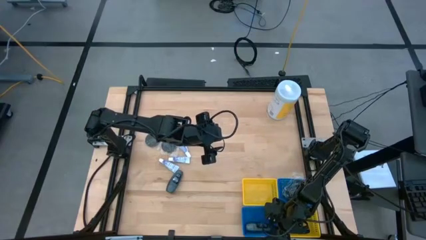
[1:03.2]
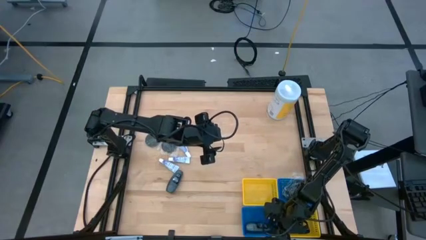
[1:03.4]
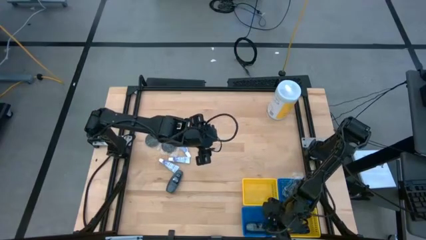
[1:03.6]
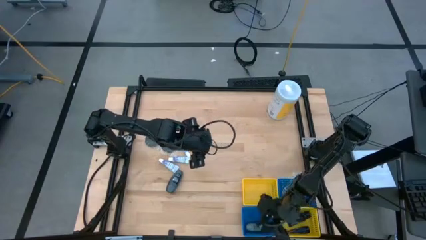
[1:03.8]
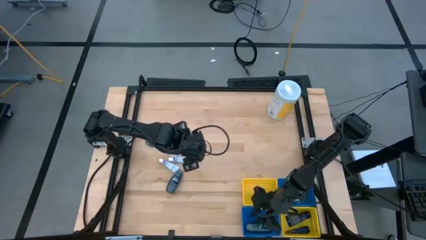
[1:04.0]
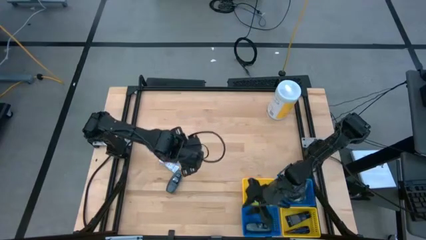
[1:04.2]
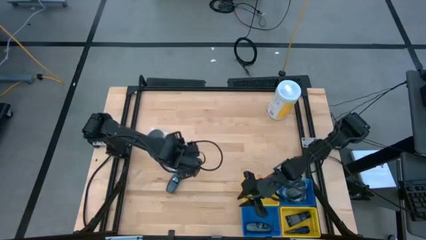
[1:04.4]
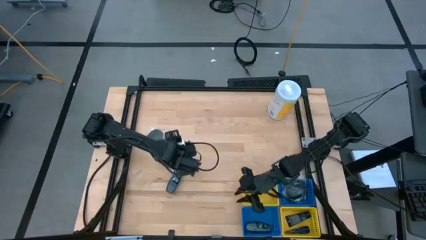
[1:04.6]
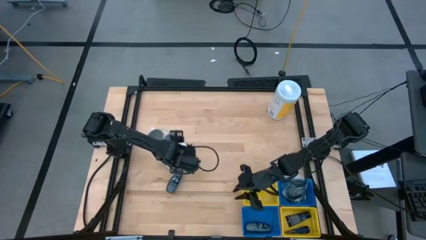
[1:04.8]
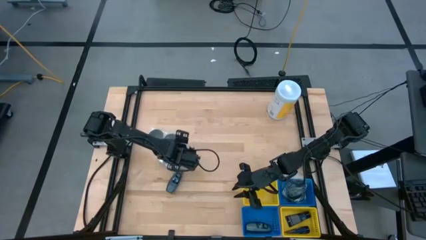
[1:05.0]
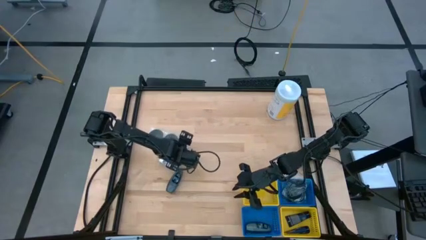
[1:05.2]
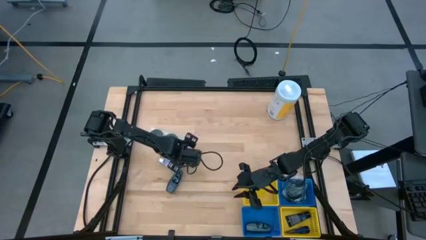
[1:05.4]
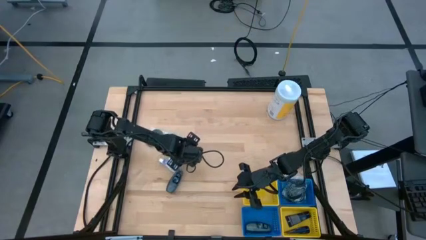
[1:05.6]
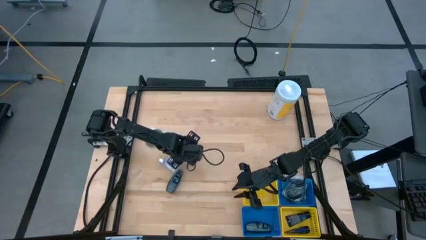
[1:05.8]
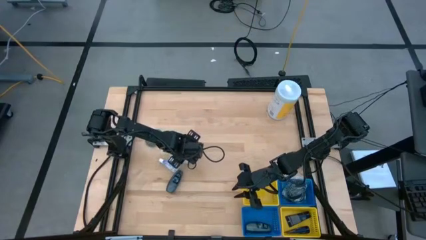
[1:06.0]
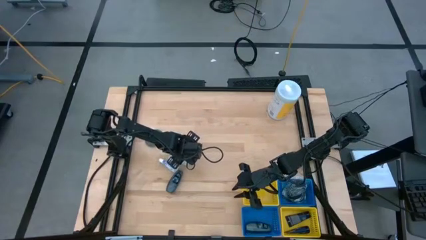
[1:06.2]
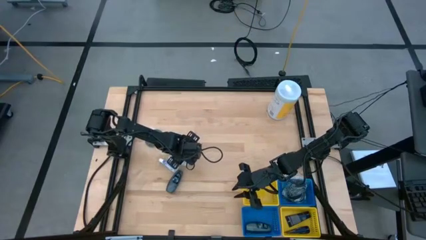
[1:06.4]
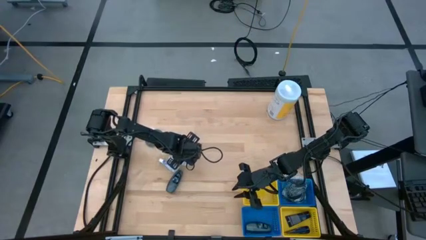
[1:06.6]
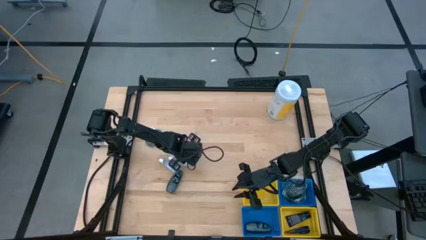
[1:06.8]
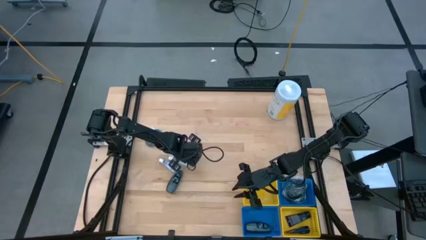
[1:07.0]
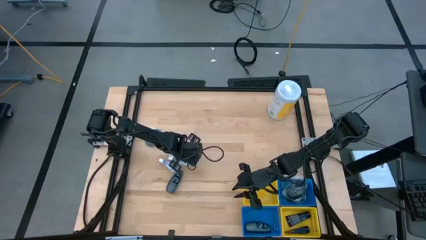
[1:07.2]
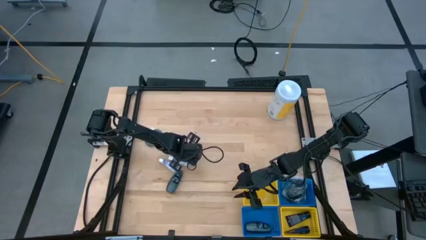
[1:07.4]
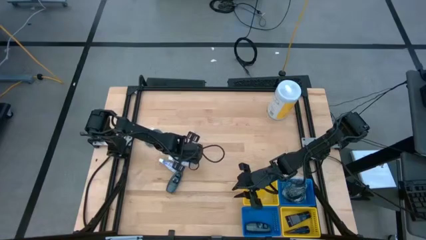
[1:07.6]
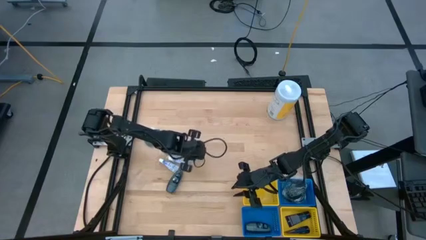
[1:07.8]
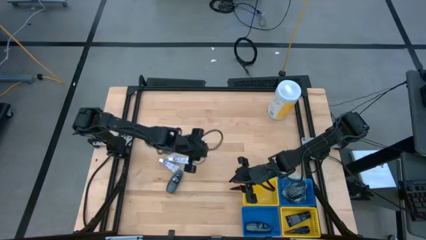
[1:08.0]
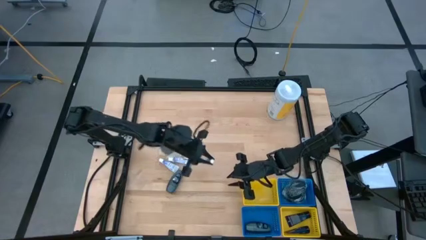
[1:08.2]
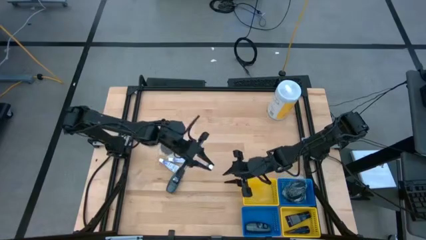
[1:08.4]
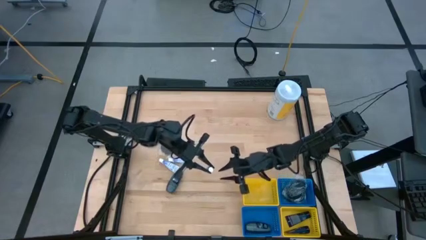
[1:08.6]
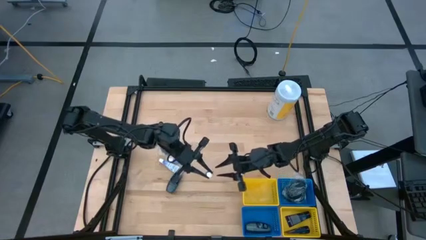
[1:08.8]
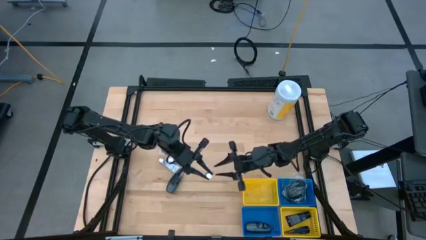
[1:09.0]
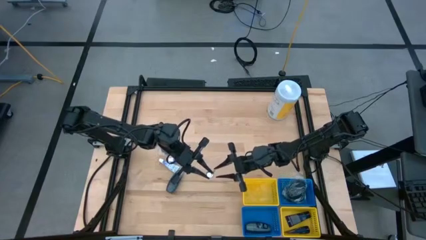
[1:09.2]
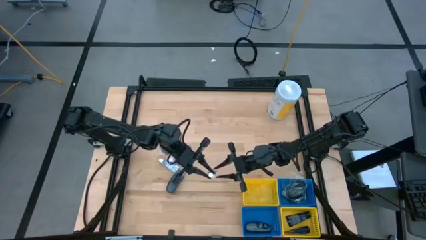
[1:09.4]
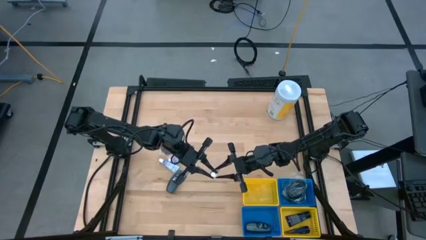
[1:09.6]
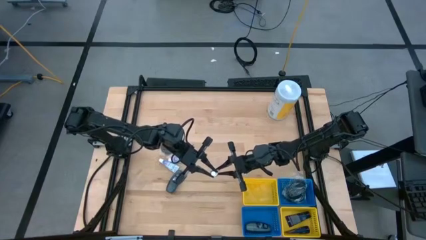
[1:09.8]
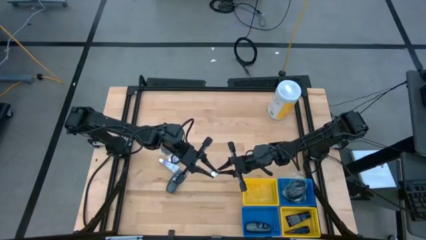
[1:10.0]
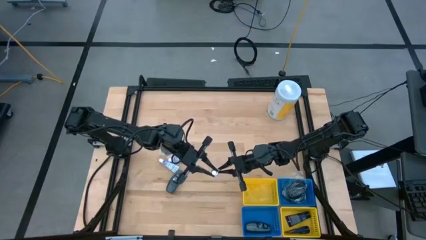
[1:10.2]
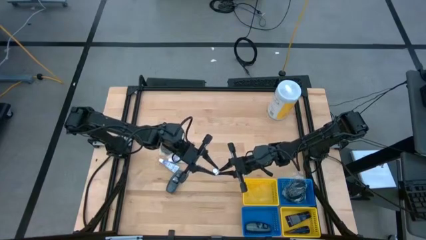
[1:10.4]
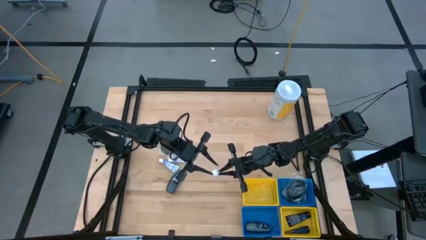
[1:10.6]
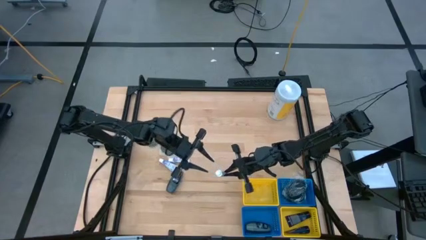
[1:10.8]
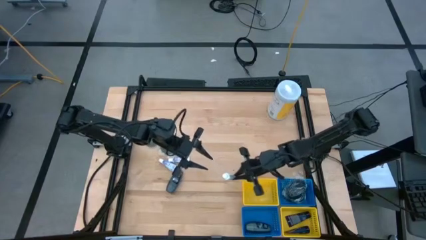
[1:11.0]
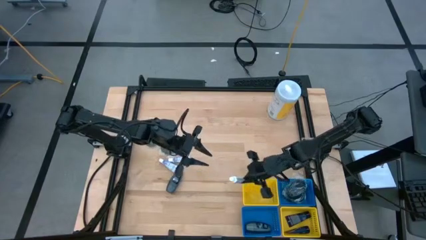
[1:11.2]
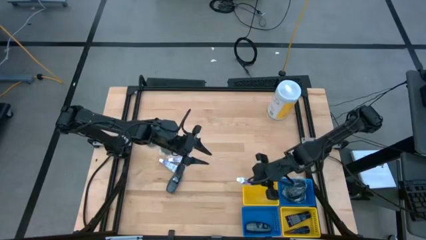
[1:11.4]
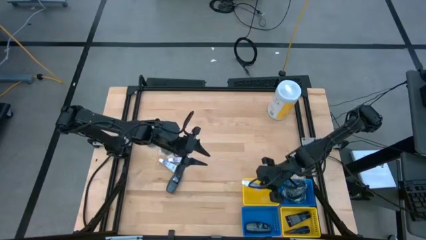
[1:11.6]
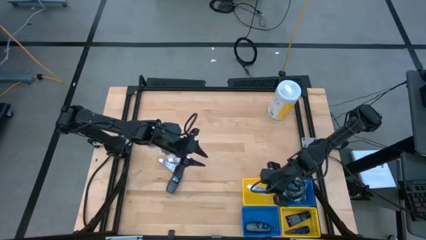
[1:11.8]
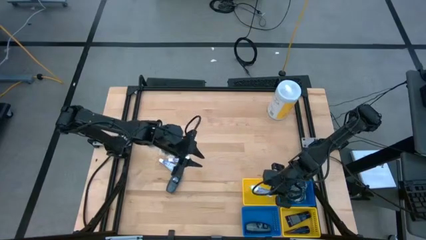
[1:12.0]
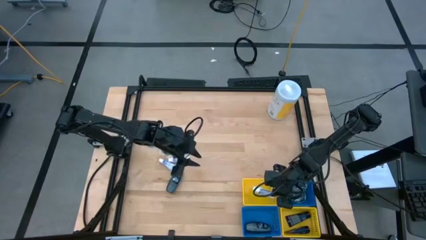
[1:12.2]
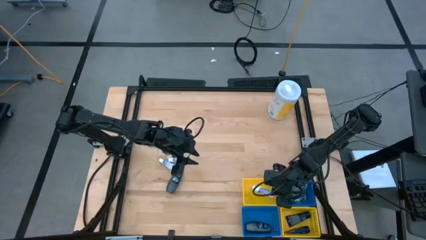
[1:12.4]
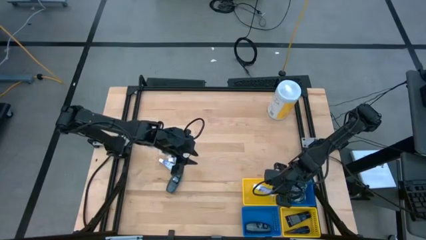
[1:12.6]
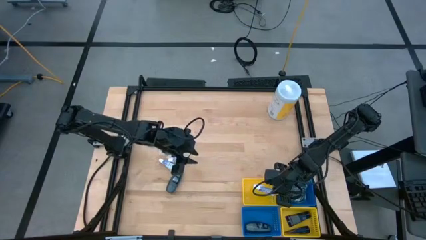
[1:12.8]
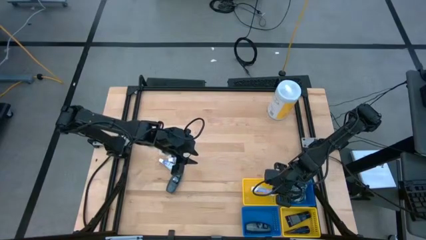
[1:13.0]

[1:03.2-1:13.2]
Task: Pick & Place Travel size toiletries
Put the white toothpaste into the top yellow bin

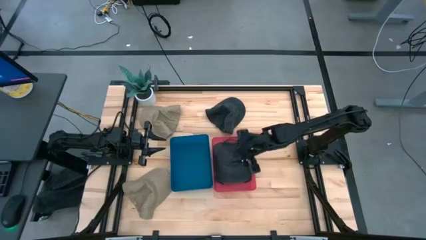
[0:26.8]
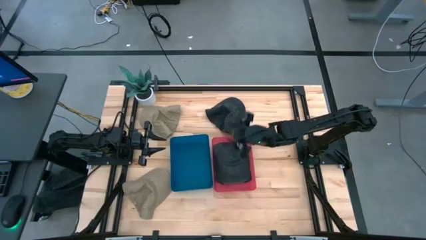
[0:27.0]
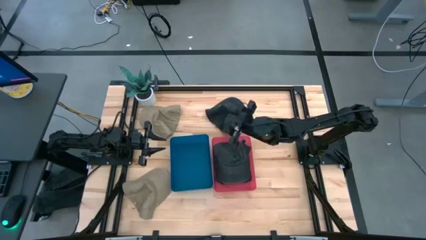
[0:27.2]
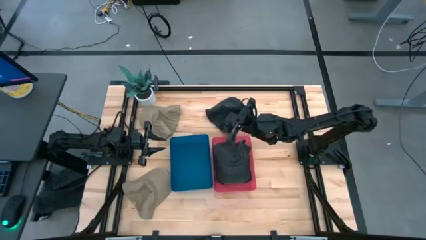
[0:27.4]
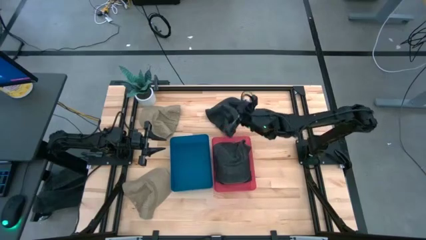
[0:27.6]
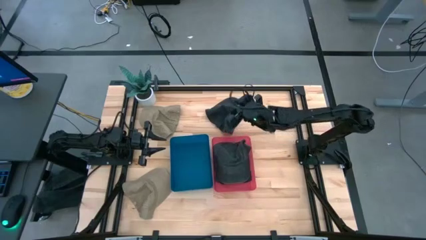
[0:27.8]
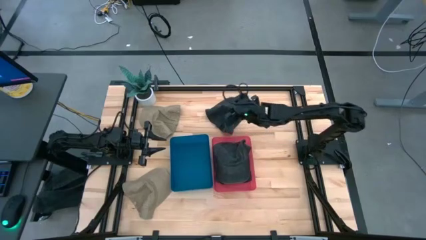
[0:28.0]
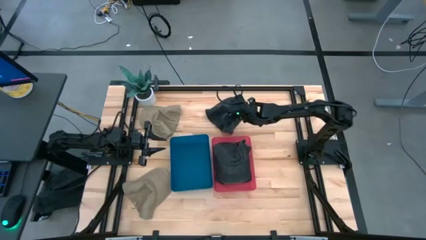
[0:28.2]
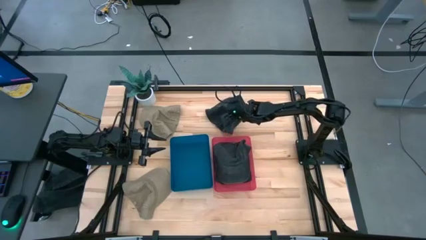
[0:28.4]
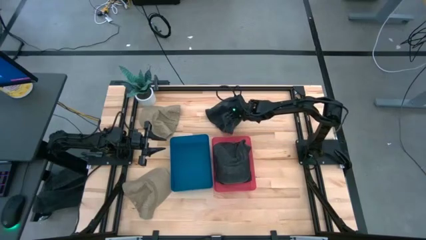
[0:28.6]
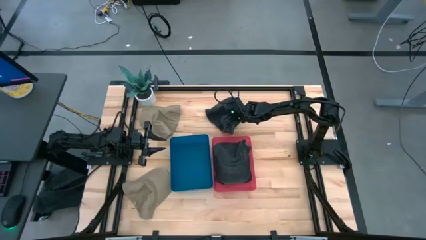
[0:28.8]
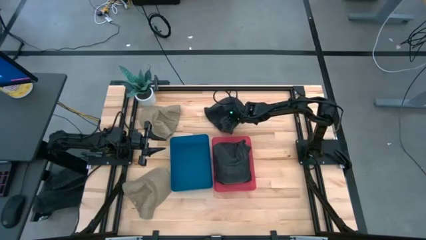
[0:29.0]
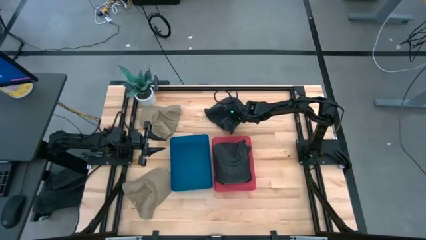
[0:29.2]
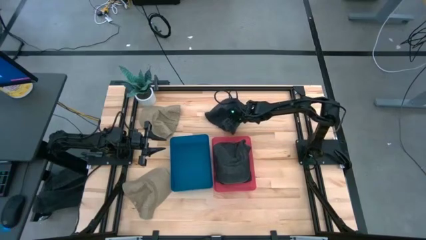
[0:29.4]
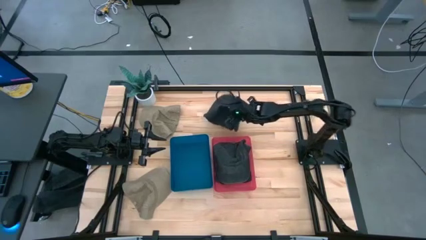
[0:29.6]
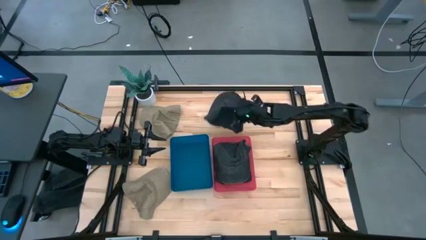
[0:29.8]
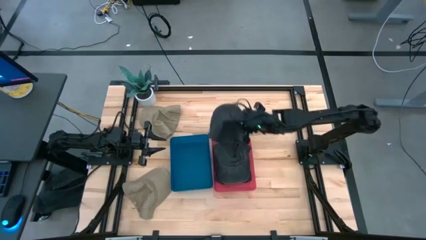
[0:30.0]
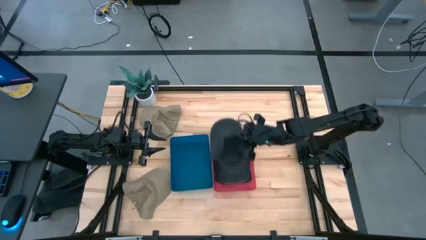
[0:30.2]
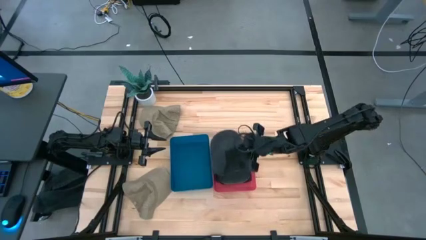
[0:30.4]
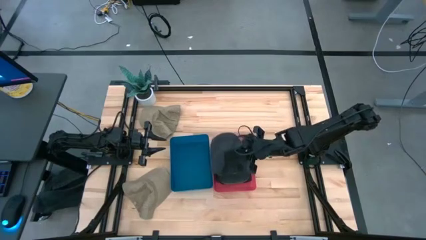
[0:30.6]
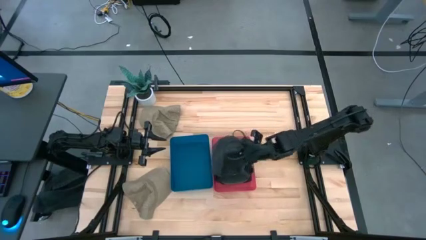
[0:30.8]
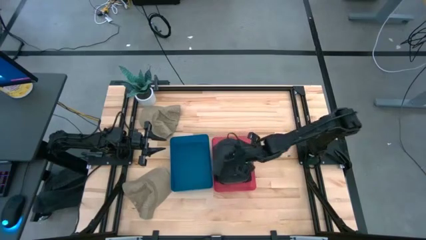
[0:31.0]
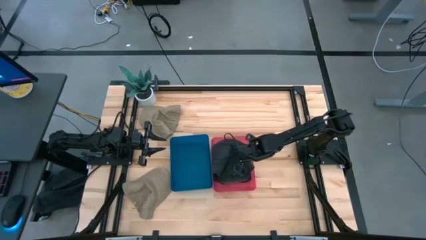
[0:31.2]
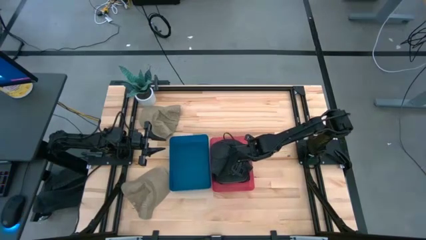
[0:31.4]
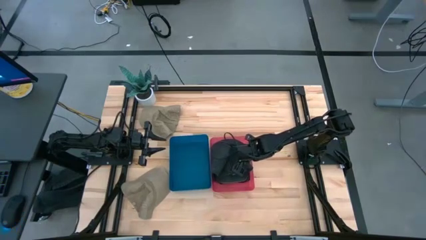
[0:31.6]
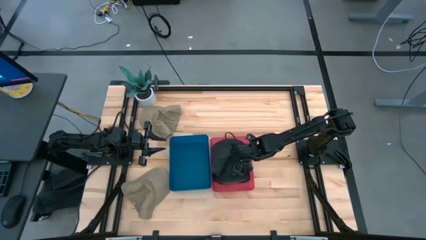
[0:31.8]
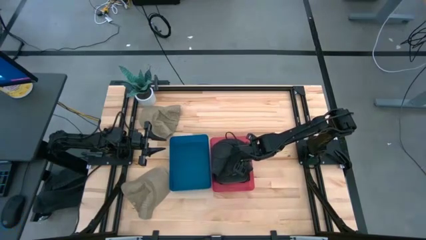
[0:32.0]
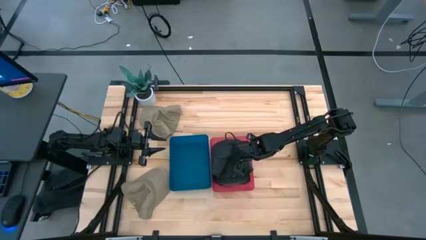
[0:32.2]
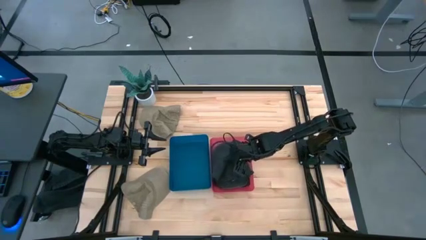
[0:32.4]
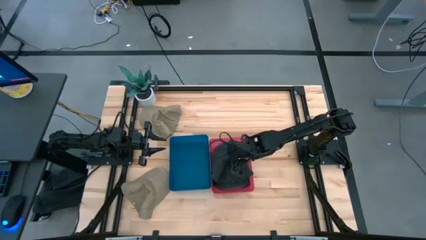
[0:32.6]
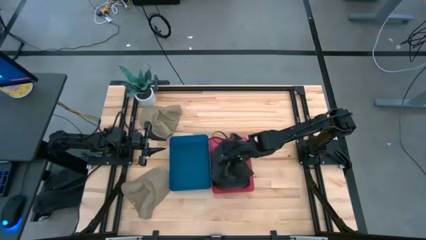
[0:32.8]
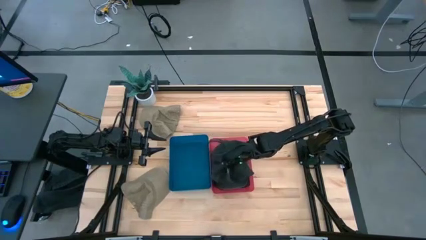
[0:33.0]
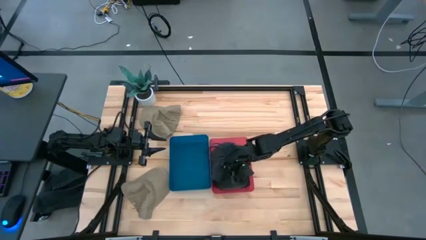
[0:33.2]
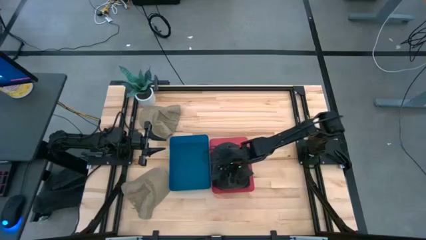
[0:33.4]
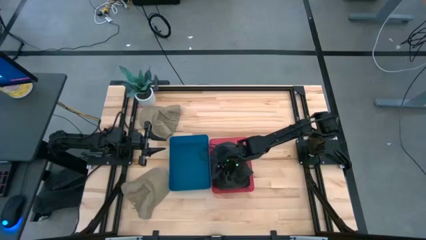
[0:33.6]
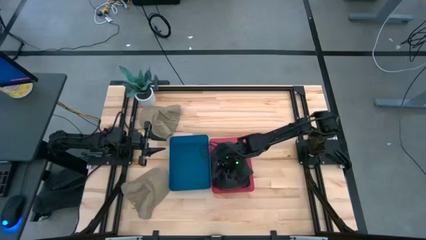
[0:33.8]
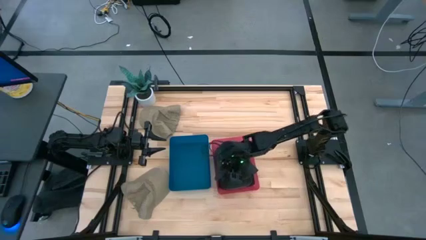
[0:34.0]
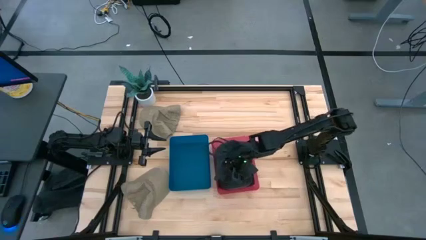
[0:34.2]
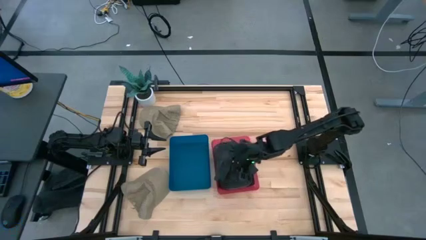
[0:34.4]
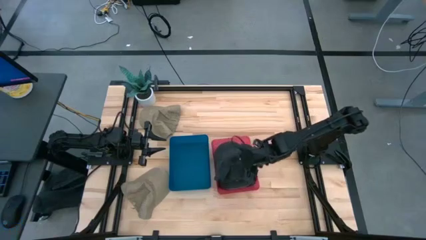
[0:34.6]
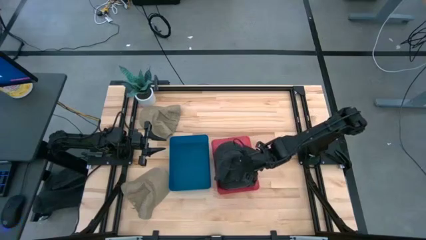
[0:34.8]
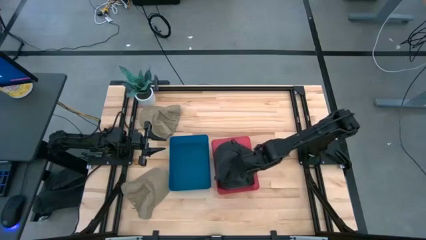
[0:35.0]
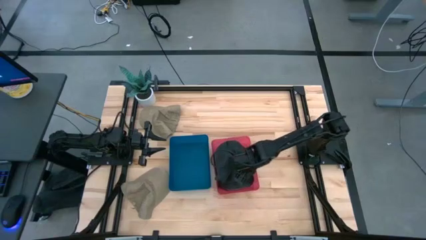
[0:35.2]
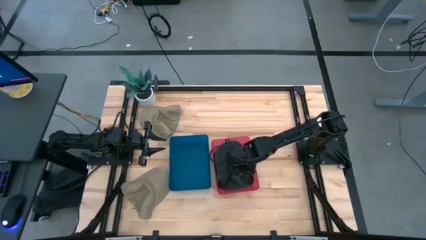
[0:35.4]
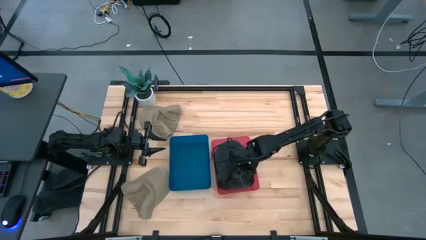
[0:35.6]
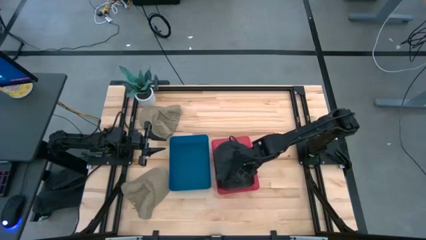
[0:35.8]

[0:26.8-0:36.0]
Task: Pick & Place hat
Put the black cap into the pink bin
